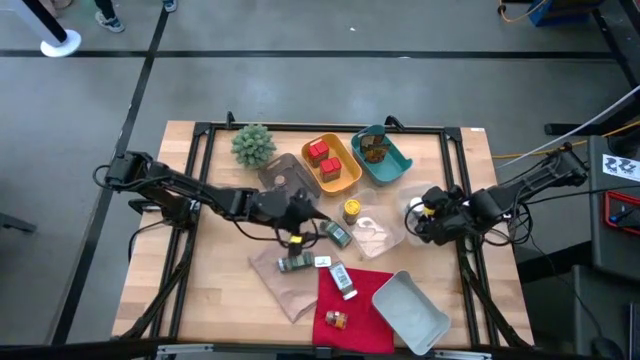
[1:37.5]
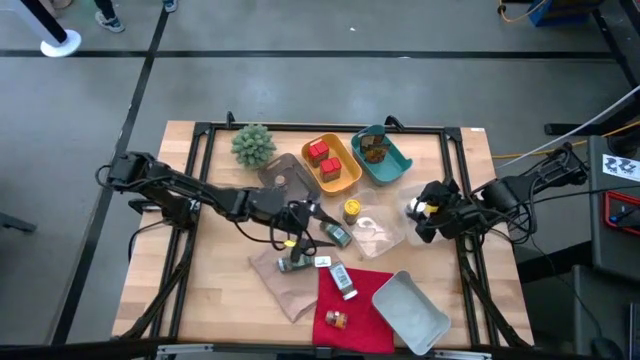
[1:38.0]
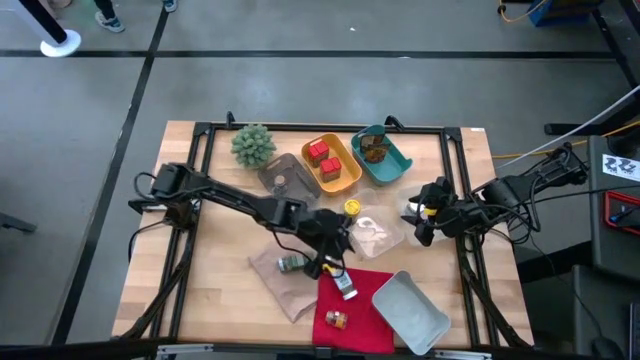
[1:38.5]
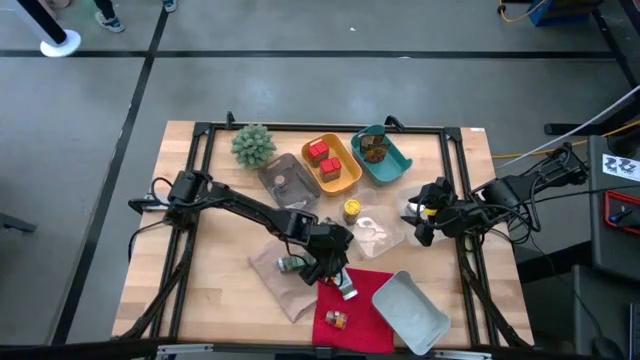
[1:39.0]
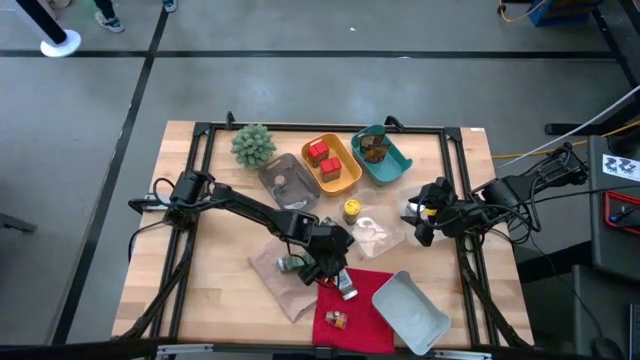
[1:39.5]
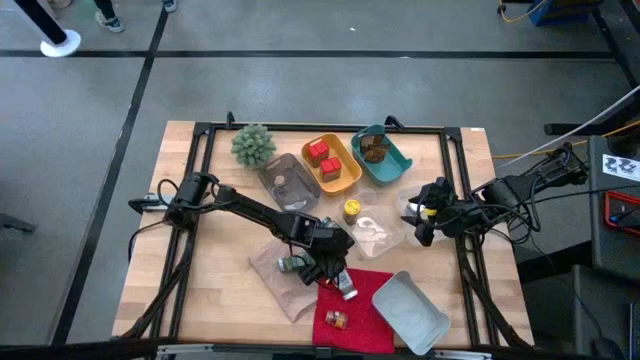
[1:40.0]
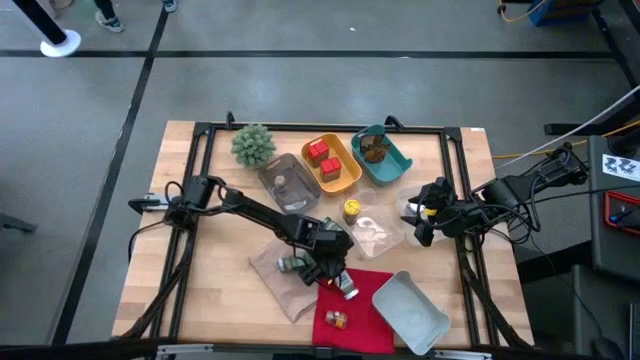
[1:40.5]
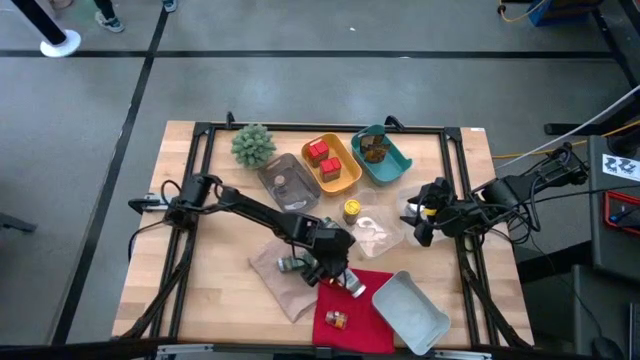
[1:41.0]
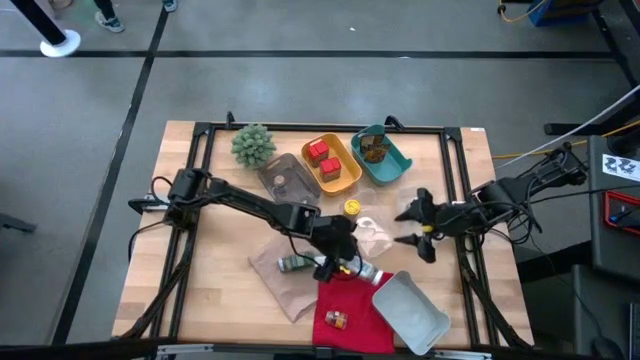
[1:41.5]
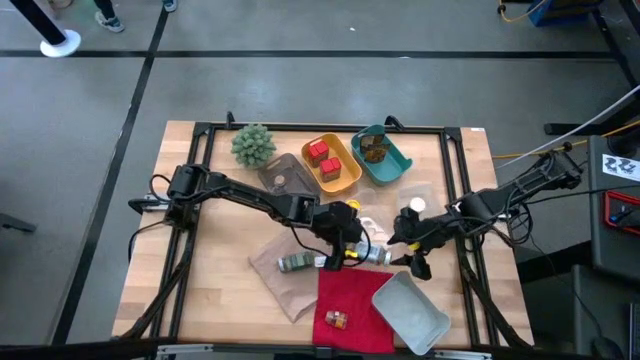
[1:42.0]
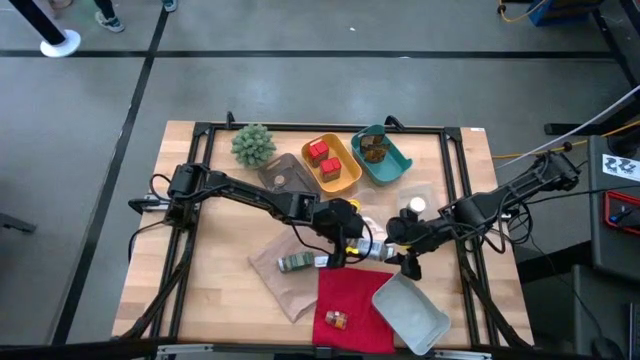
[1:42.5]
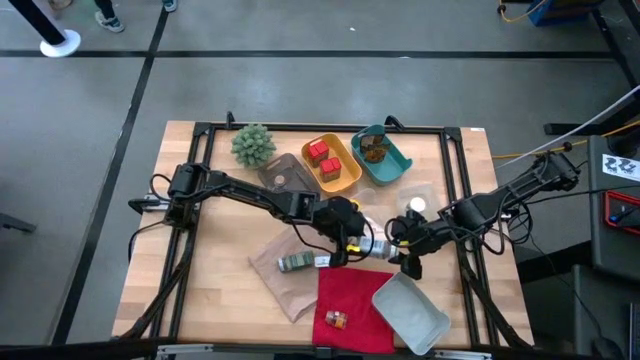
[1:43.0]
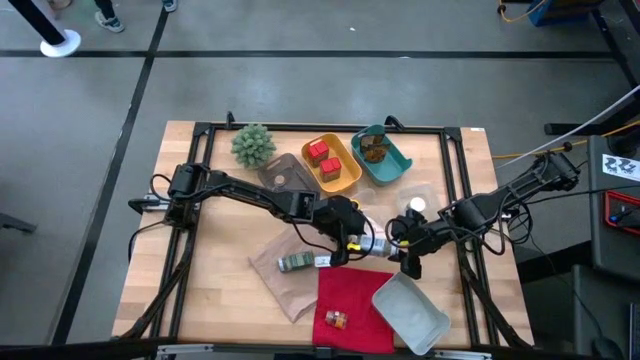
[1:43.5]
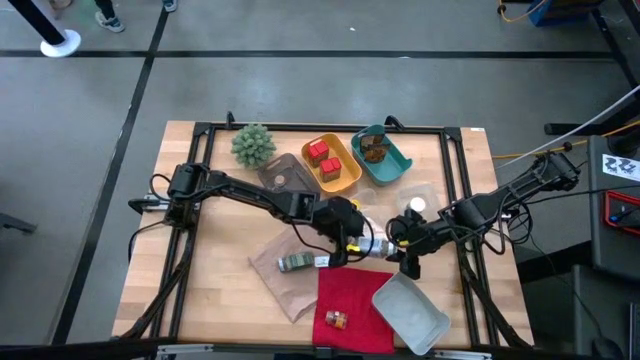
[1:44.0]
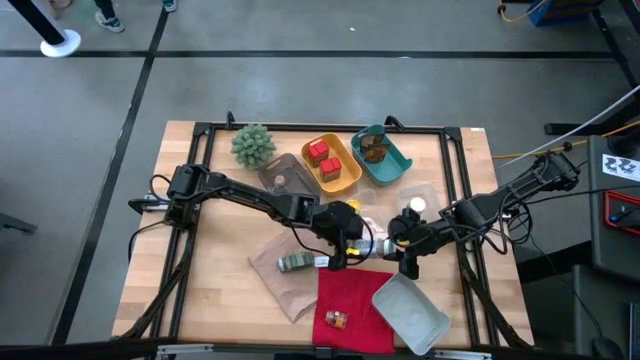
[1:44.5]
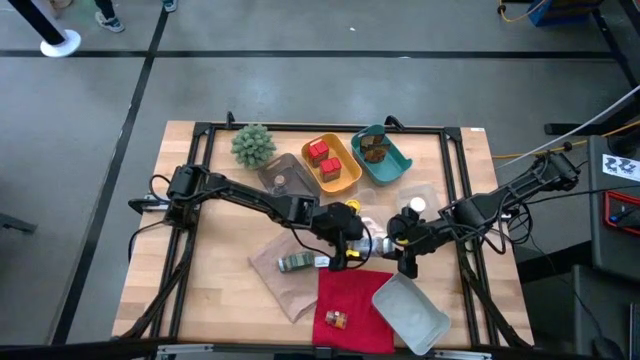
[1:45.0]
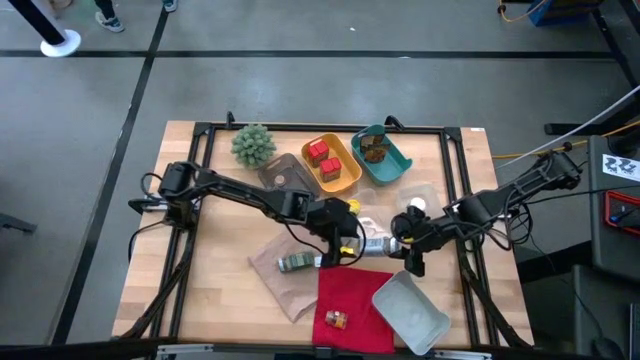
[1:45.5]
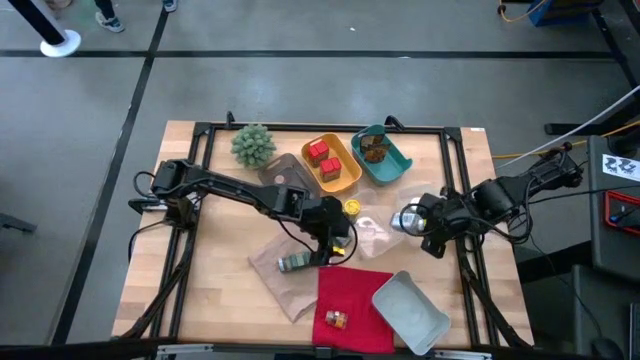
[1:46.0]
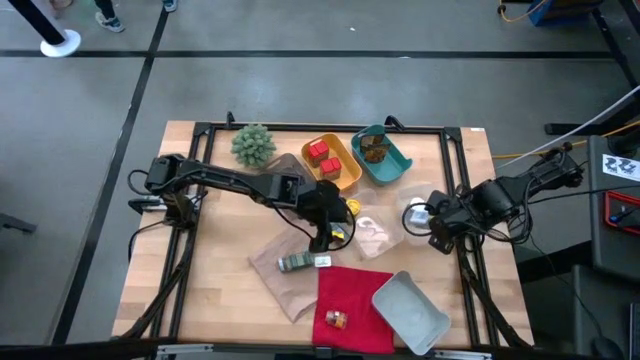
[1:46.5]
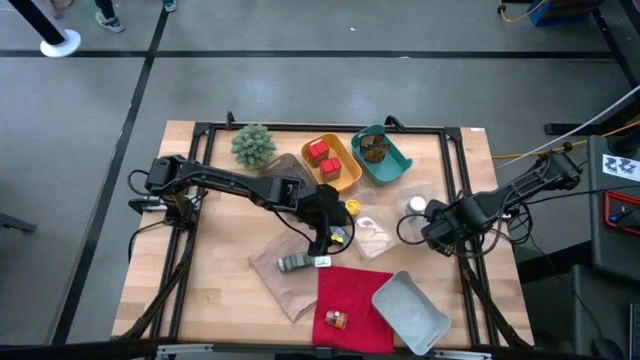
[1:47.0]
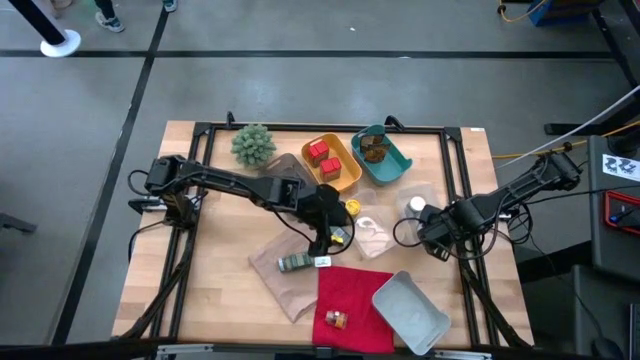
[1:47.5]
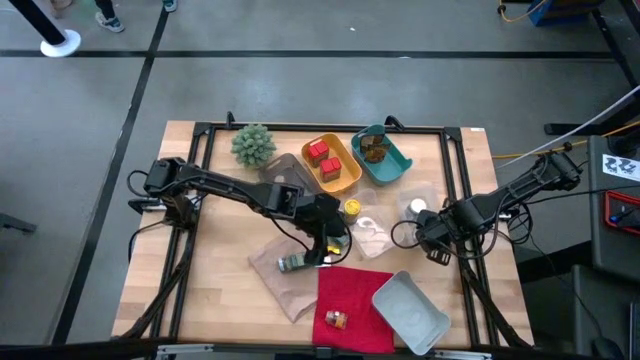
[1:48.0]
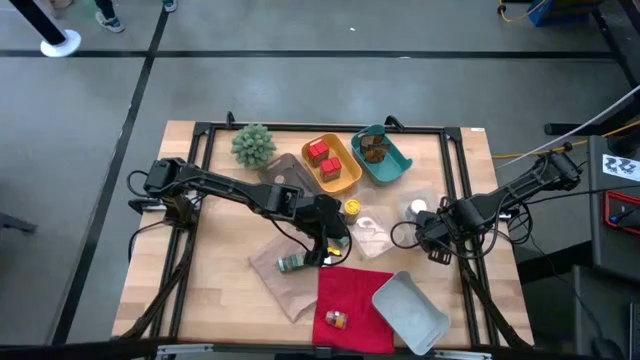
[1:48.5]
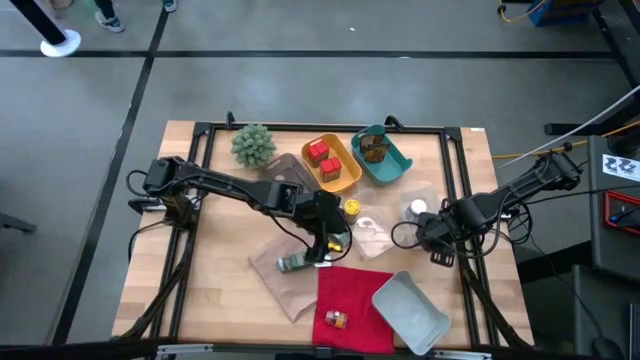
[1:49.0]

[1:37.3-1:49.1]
Task: Sort spices by type
Put the white seasoning bottle into the right transparent bin

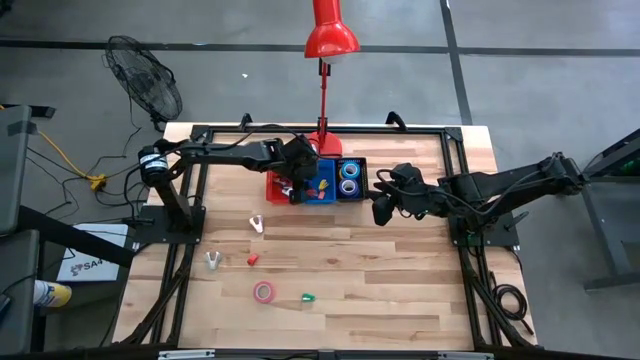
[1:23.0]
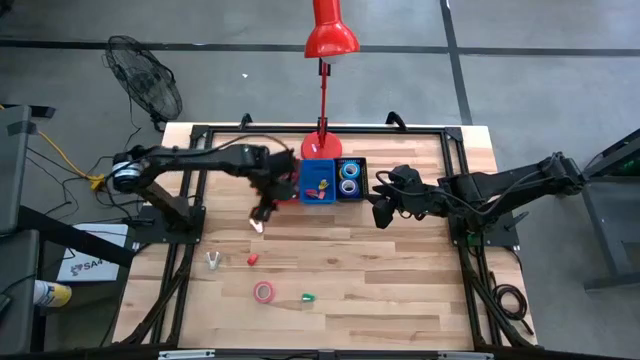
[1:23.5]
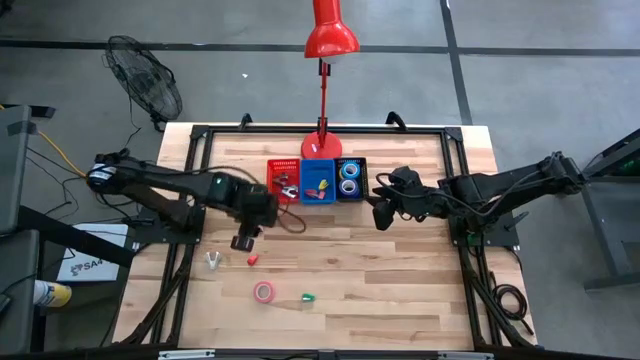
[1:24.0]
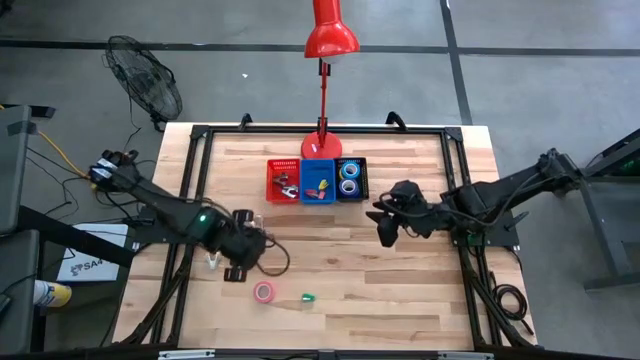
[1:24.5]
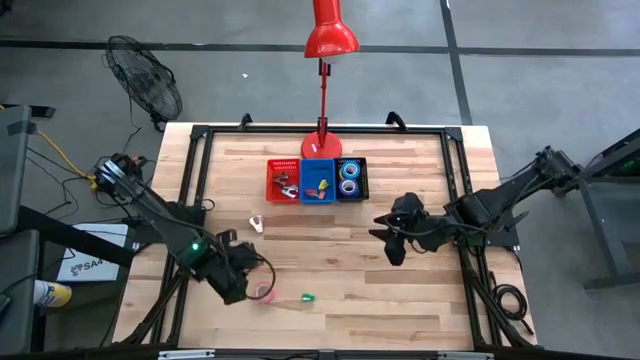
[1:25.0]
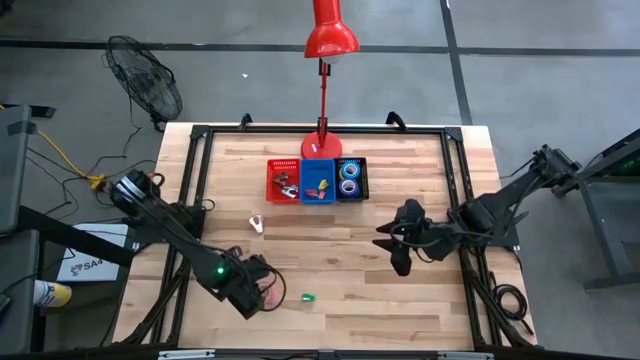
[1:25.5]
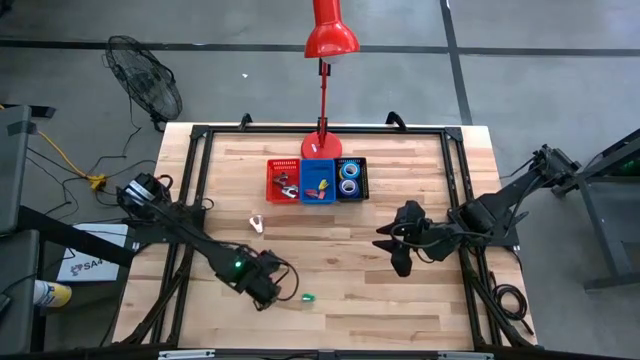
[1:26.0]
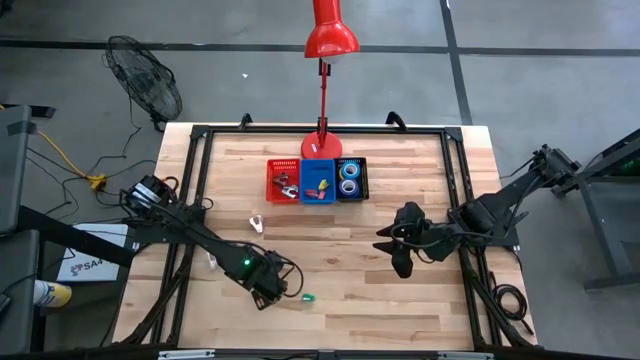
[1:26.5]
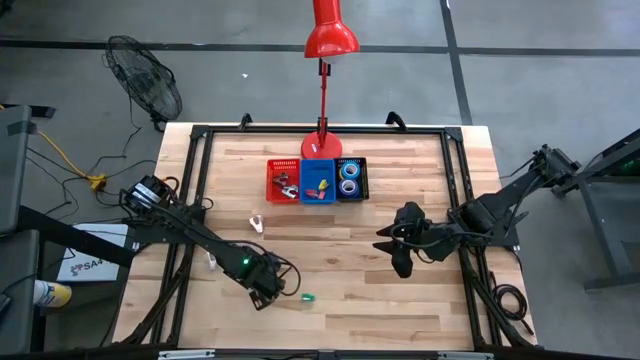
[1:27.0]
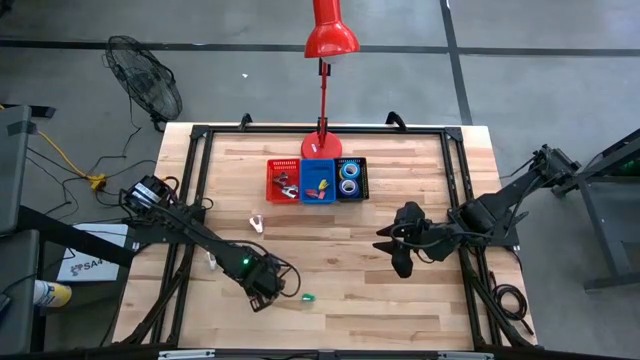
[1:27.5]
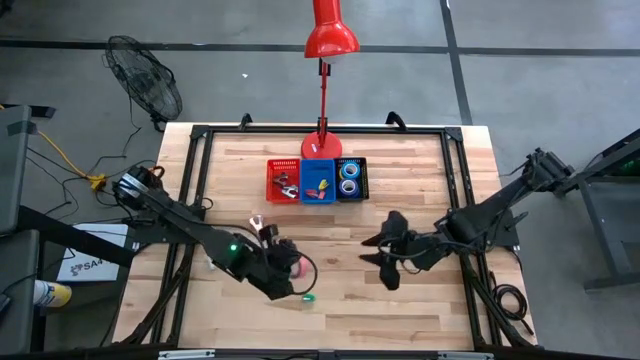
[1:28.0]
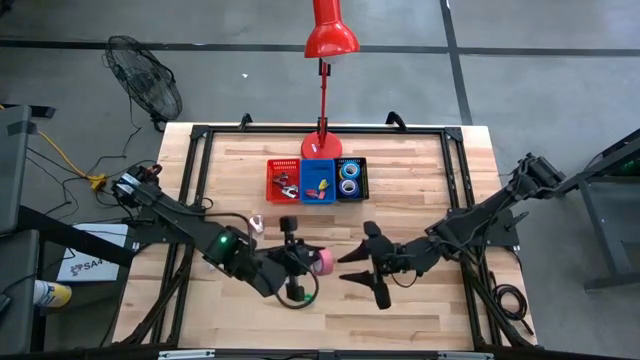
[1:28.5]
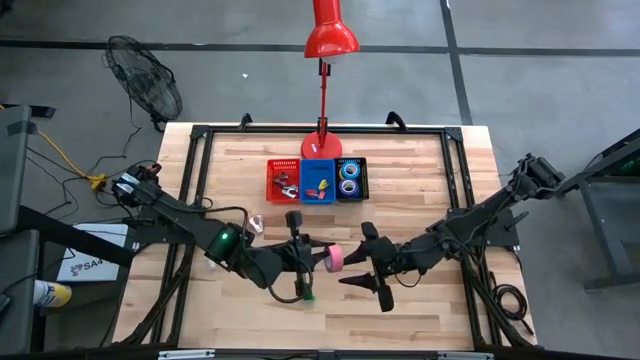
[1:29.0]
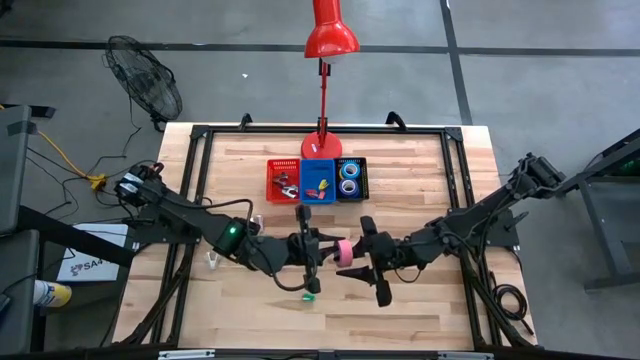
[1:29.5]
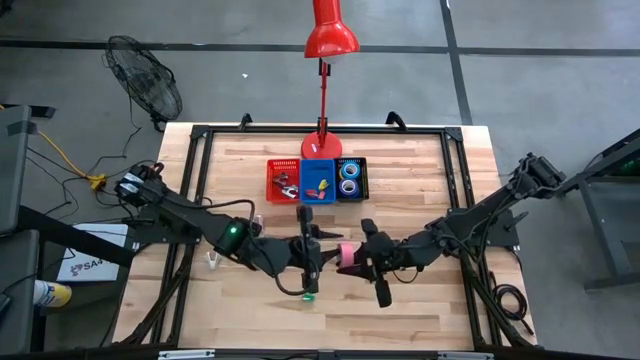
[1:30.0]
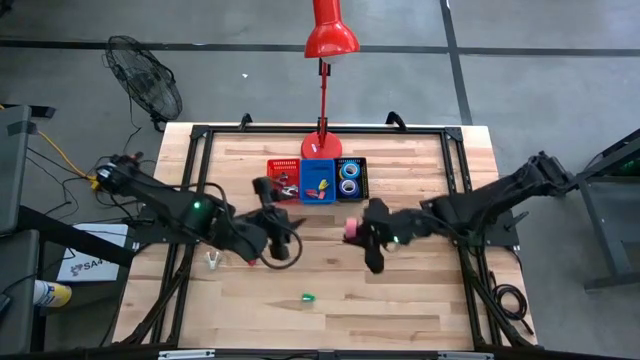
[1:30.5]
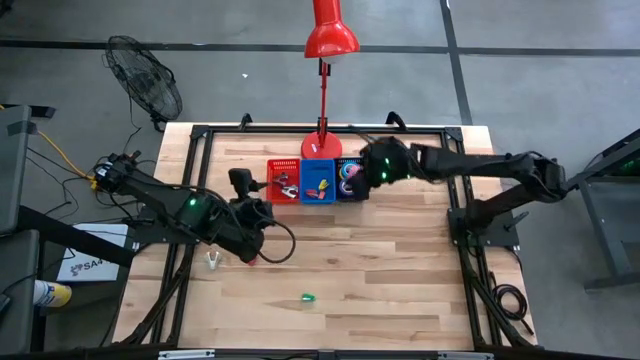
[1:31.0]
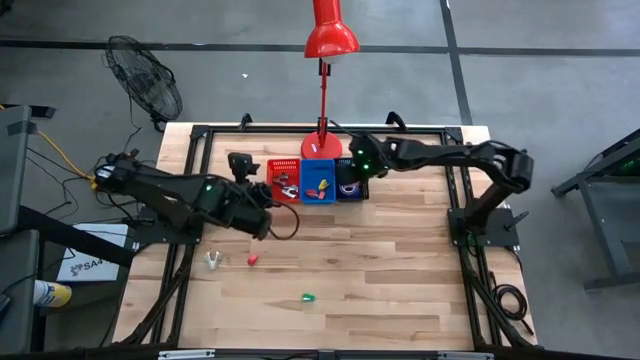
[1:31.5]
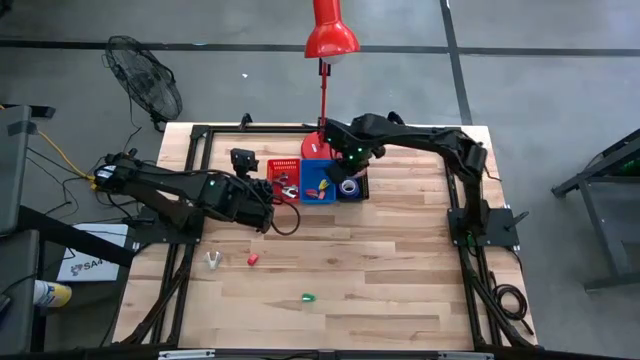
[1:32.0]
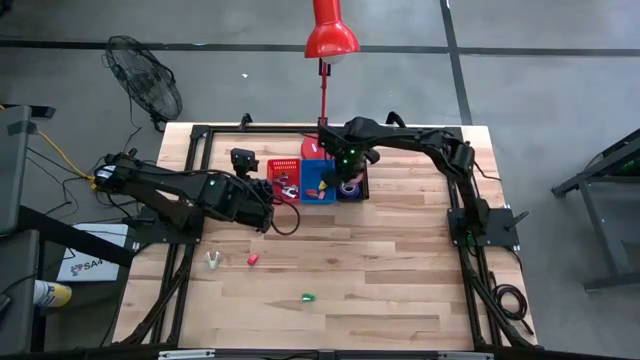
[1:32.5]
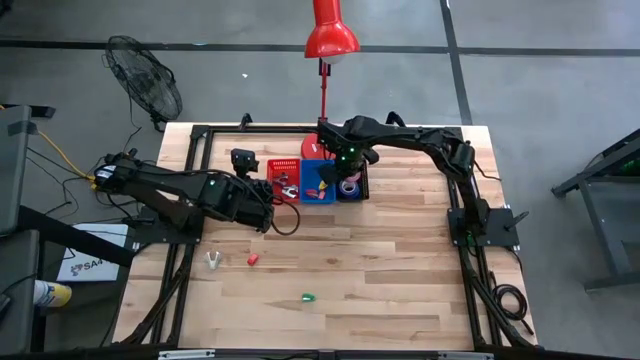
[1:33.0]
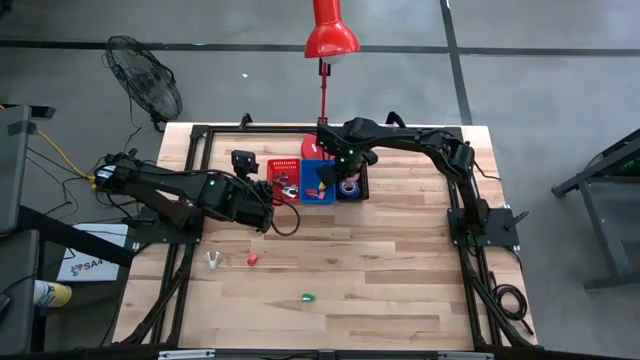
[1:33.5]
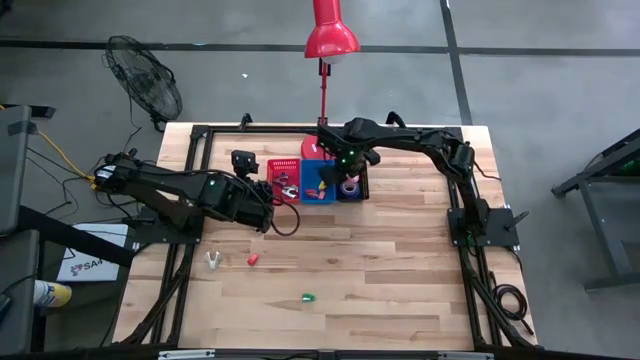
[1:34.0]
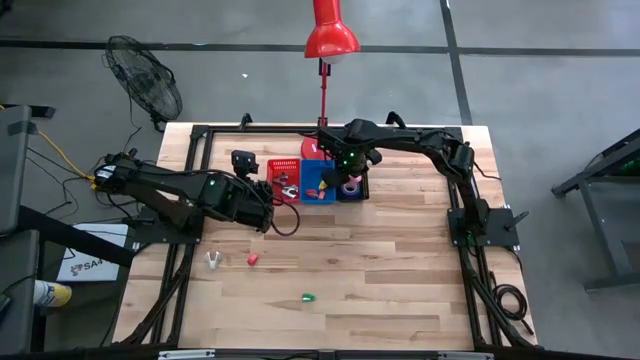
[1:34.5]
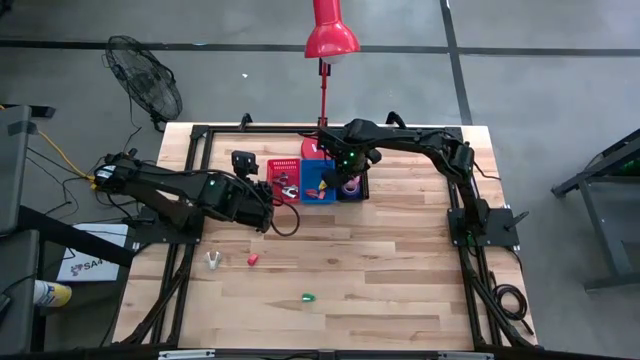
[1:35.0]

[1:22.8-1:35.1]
Task: Pick and place Stapler, Stapler remover, tape
Put the pink tape into the black basket
